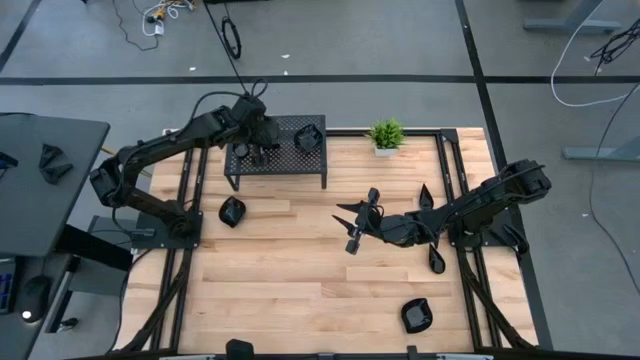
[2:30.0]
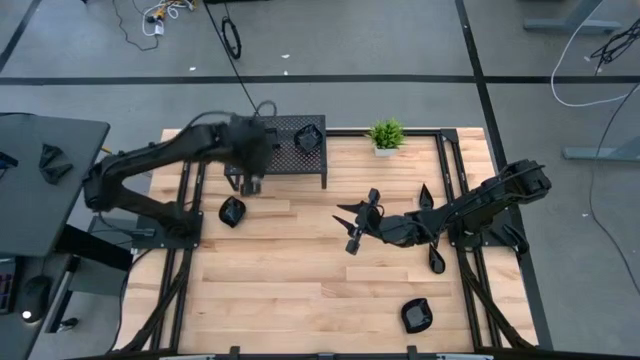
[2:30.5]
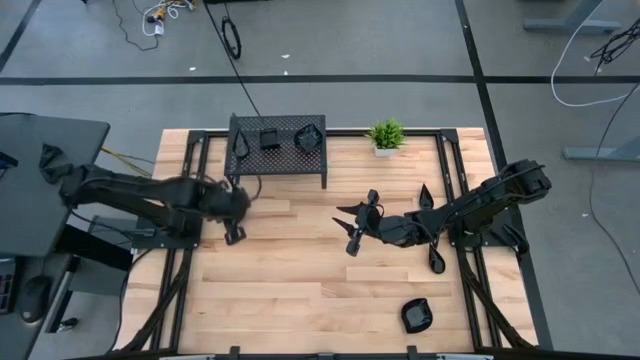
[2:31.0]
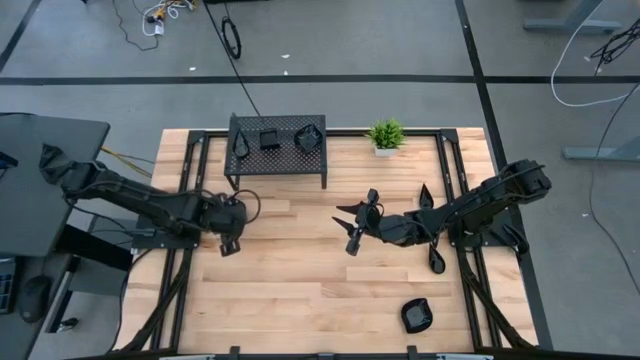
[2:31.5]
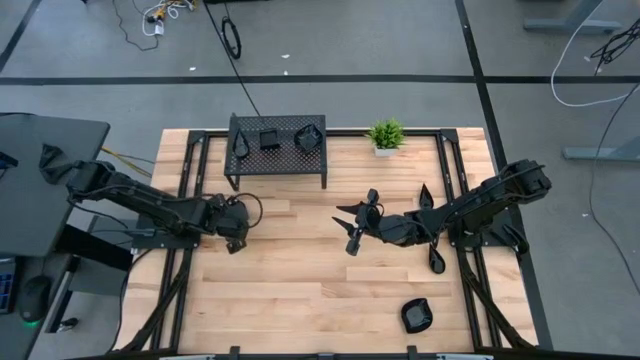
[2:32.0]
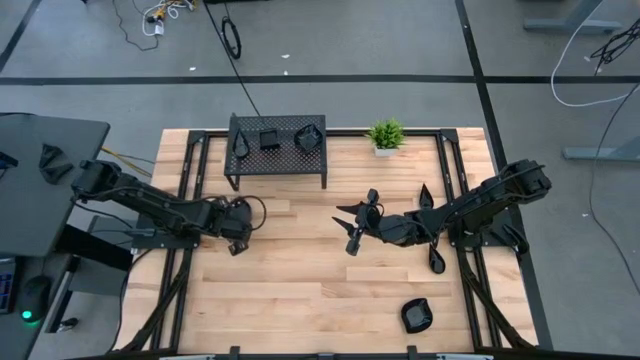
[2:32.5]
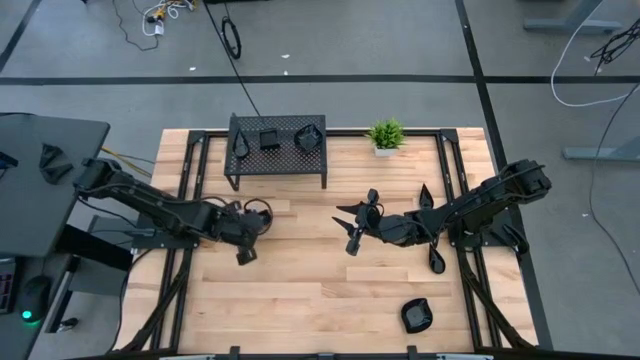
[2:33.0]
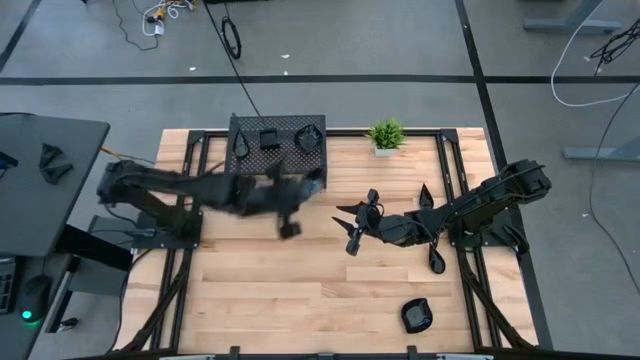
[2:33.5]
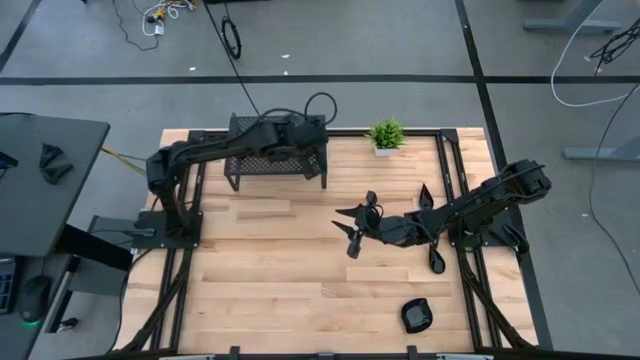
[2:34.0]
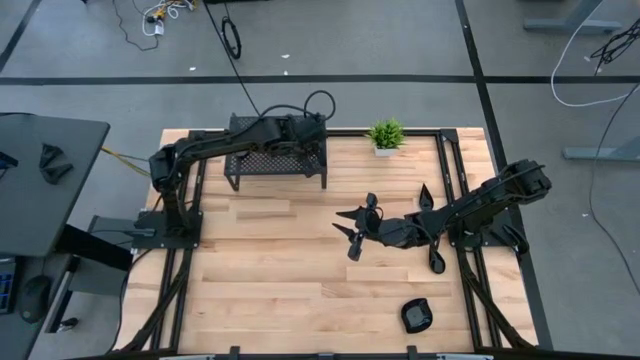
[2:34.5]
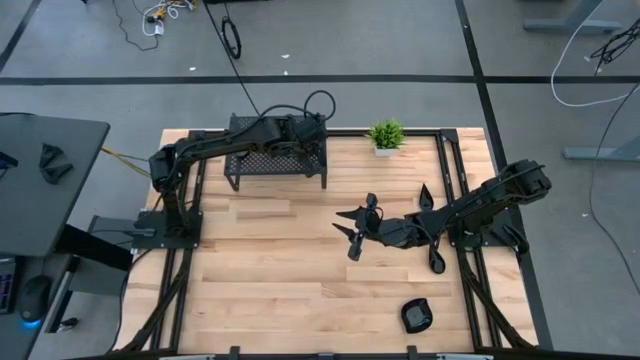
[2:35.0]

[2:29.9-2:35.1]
Task: Pick & Place Mini shaped plates
Stack the black leaf shaped plate on top of the black leaf shaped plates on the shelf

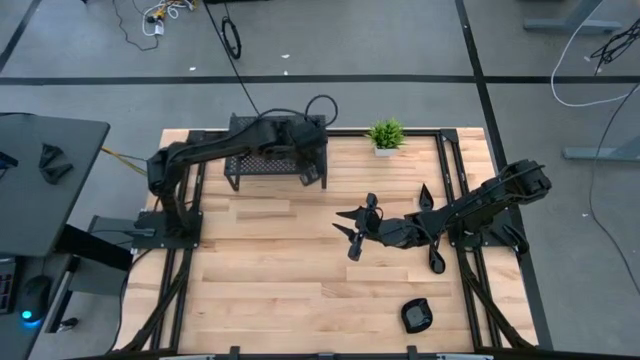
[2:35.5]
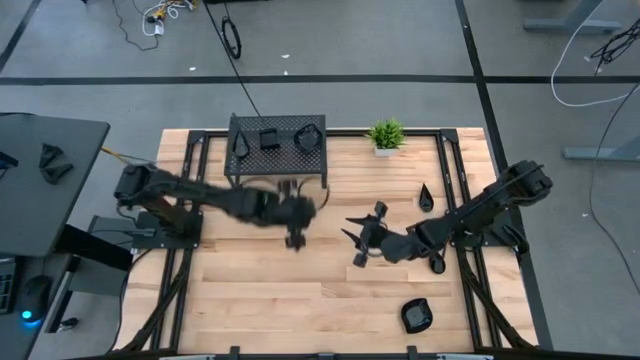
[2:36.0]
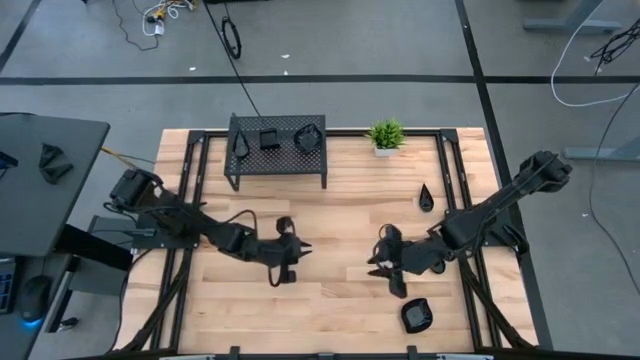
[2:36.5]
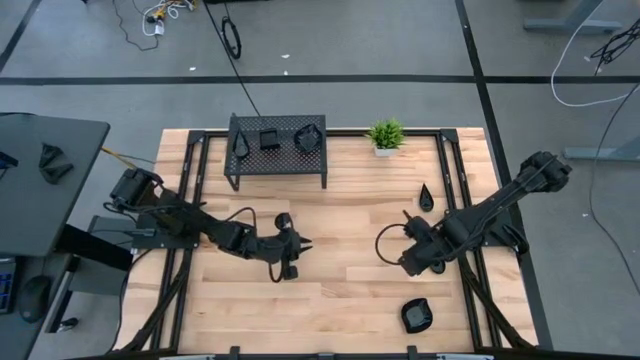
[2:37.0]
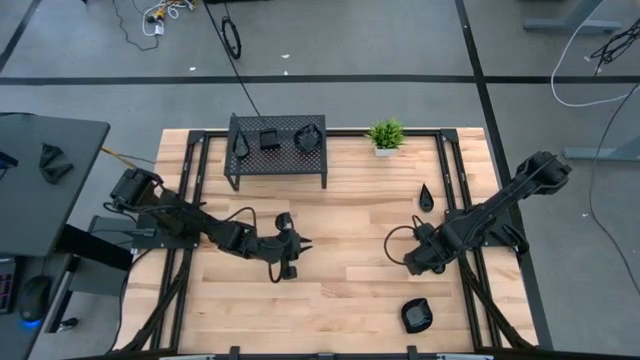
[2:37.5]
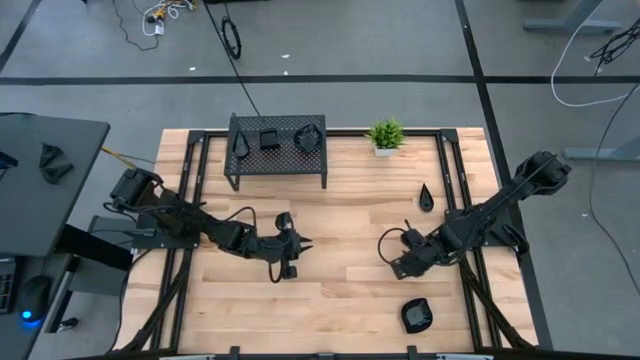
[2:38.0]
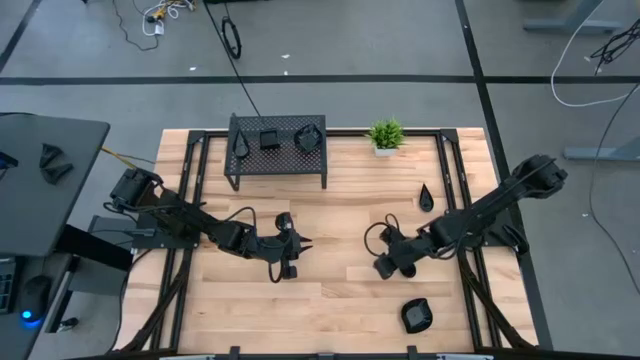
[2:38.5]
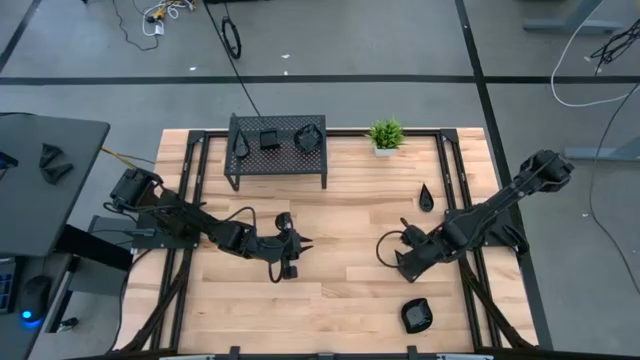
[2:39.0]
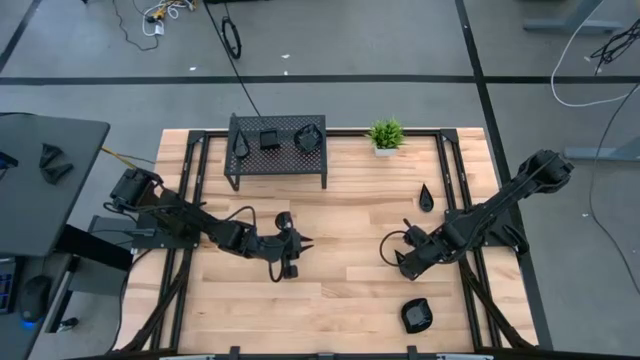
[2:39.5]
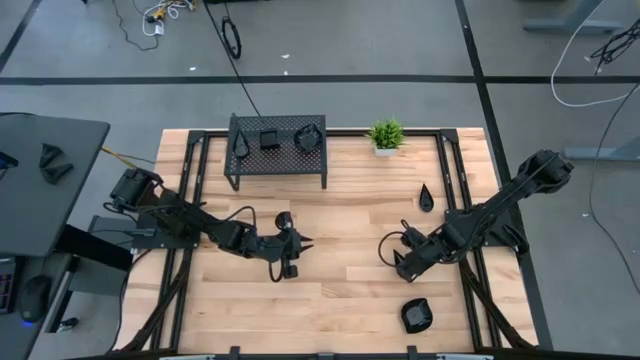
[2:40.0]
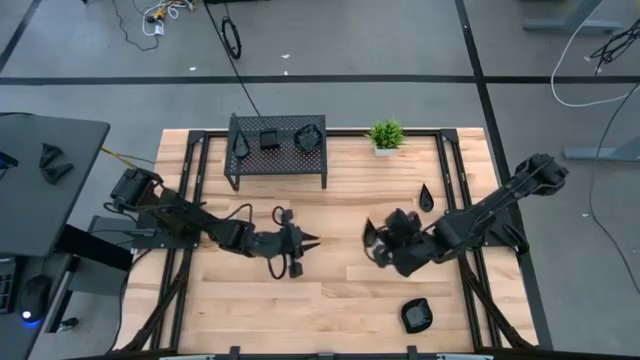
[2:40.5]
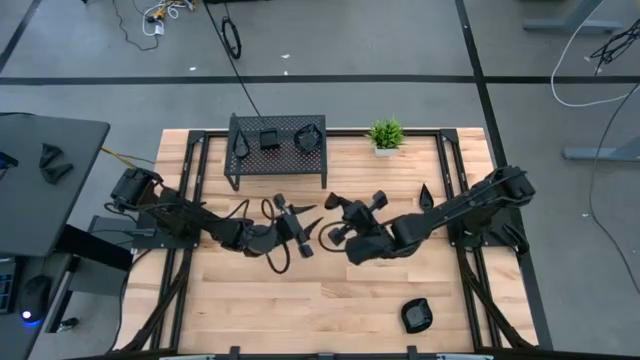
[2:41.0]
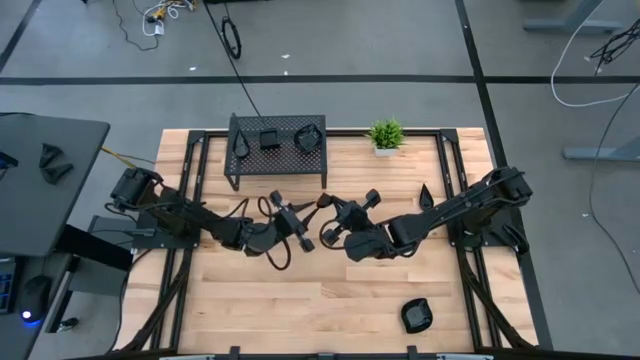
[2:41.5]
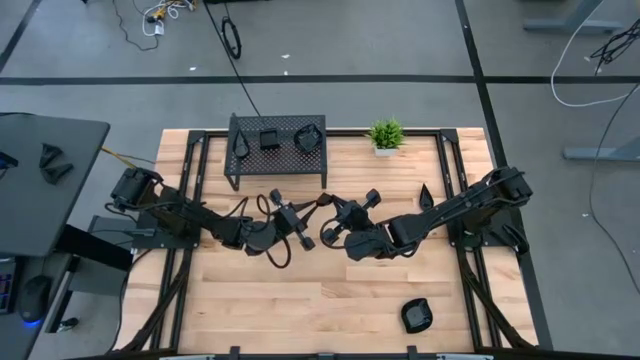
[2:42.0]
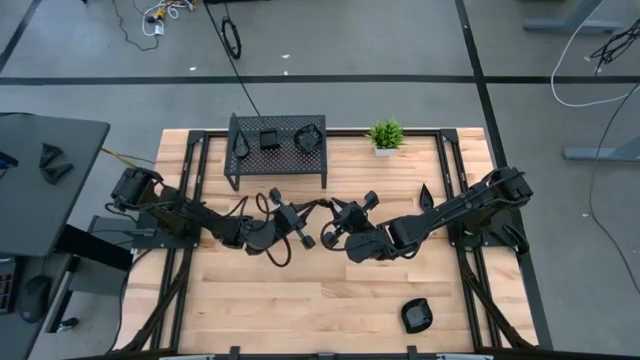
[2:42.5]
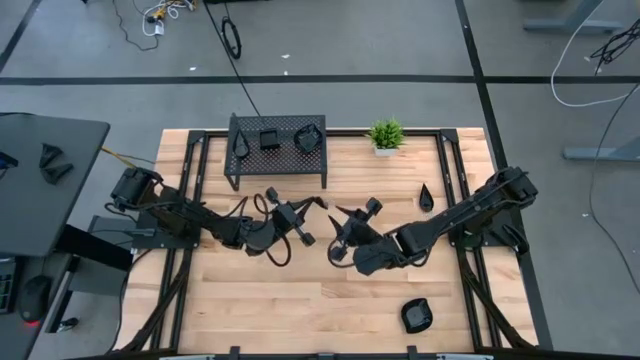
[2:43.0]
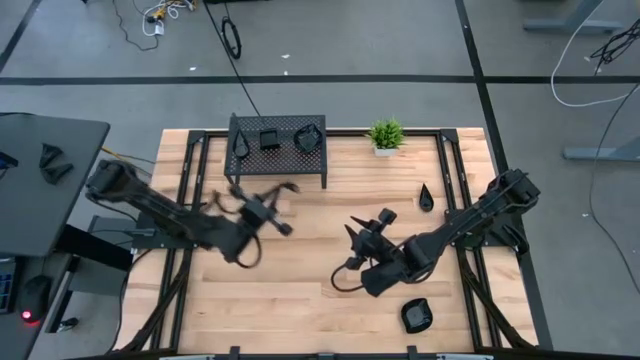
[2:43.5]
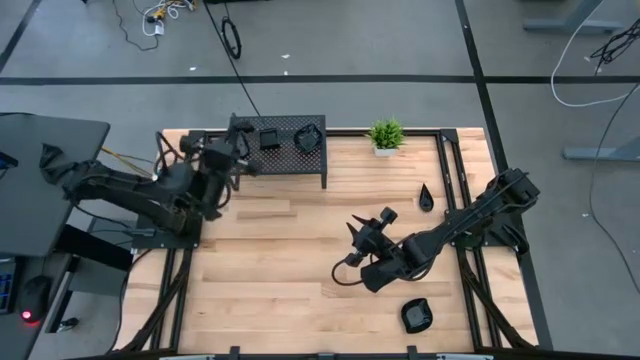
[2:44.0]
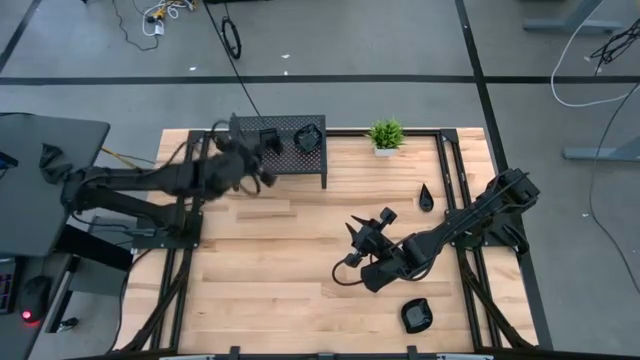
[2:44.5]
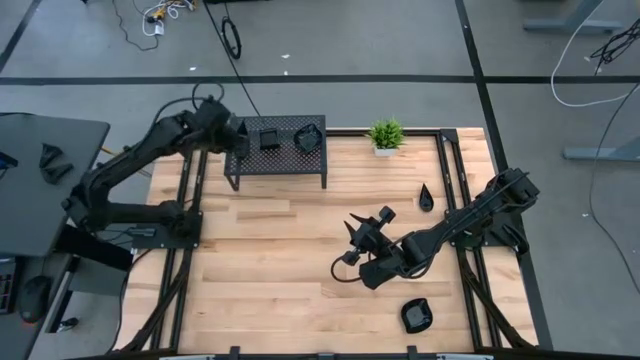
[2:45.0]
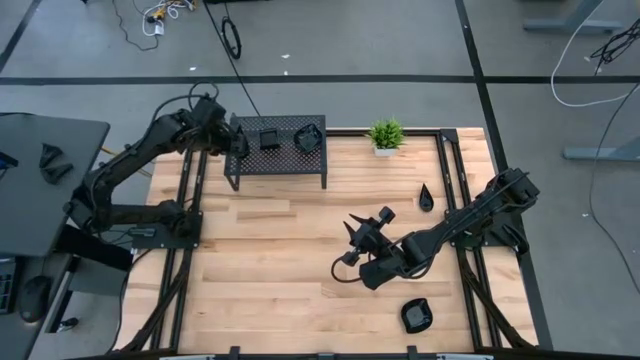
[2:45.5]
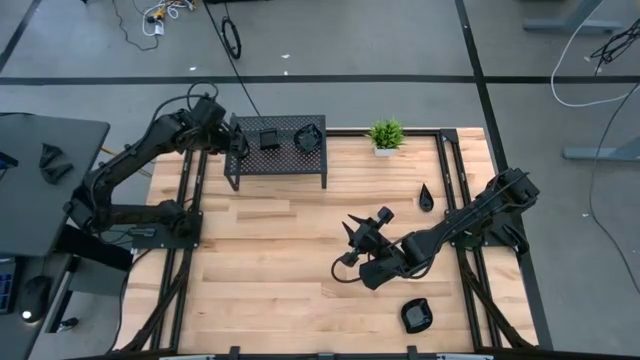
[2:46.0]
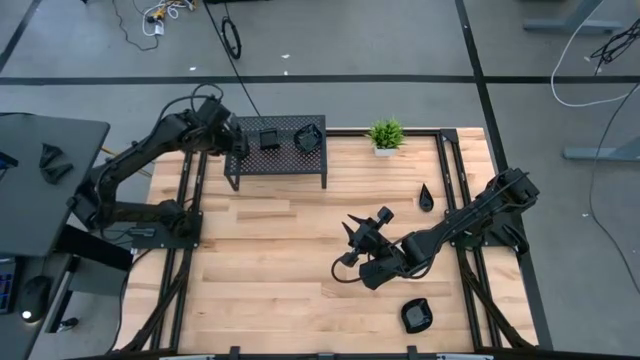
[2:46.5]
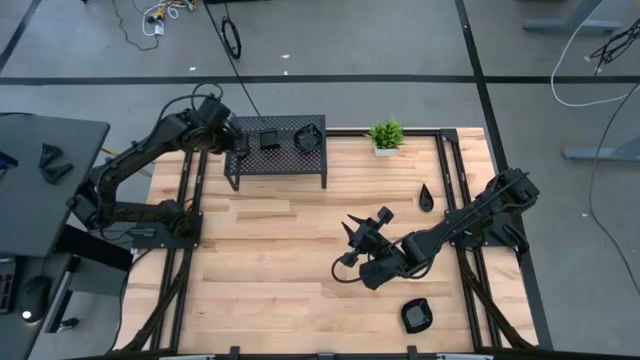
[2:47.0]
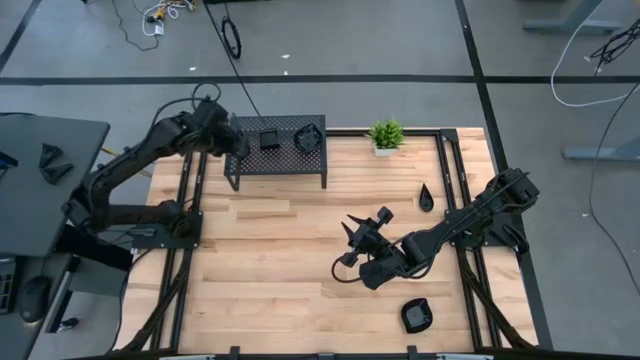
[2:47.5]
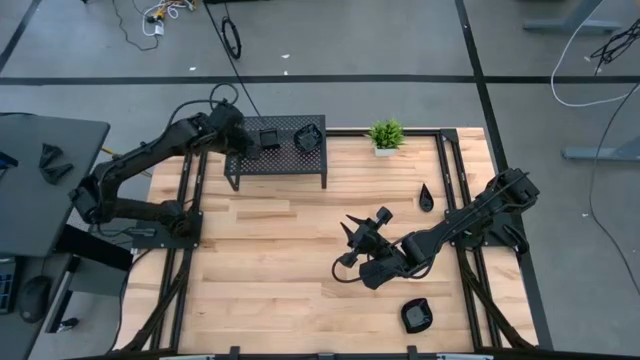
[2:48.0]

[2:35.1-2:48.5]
Stack the black drop shaped plate on top of the black drop shaped plates on the shelf

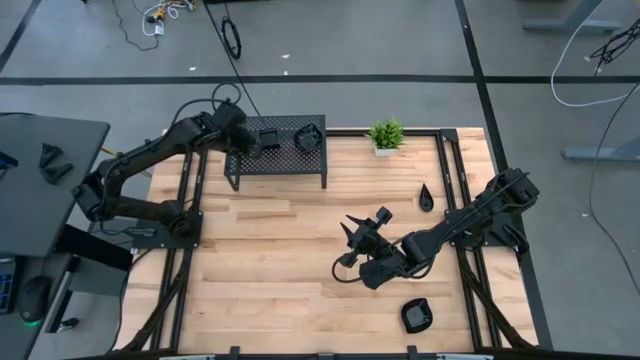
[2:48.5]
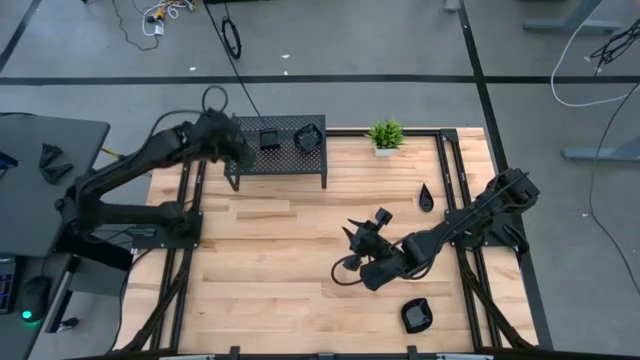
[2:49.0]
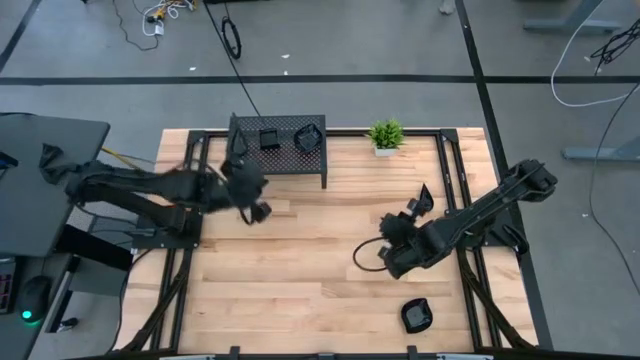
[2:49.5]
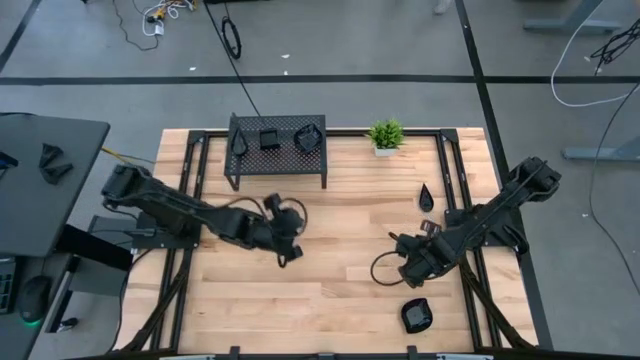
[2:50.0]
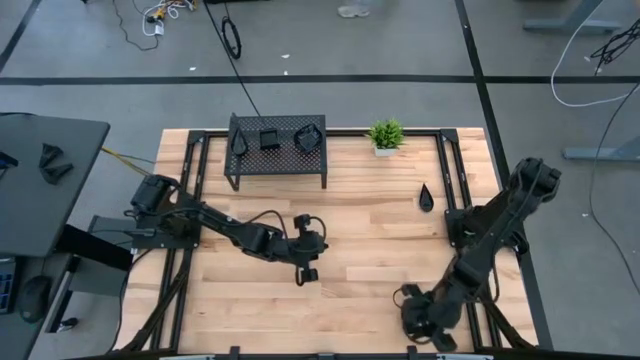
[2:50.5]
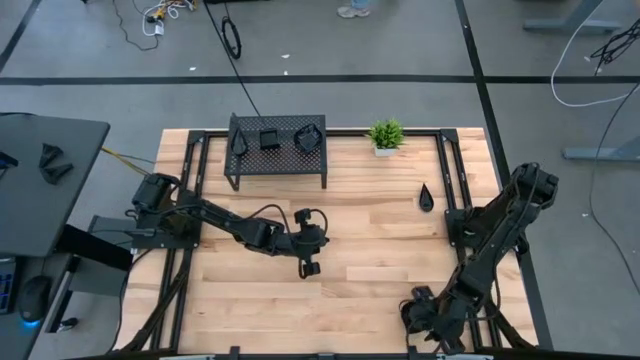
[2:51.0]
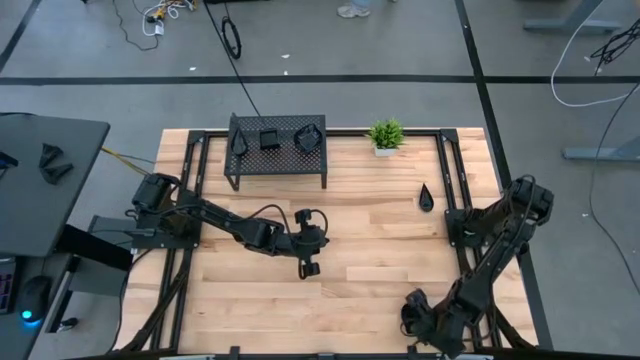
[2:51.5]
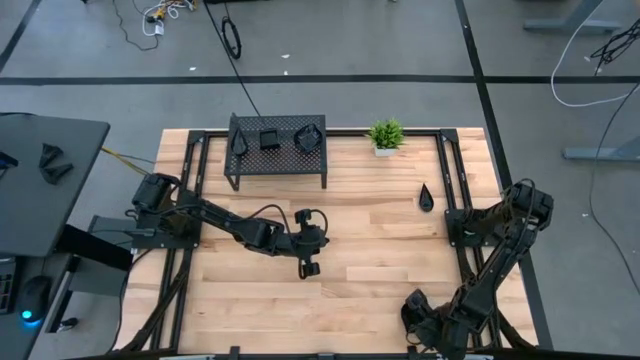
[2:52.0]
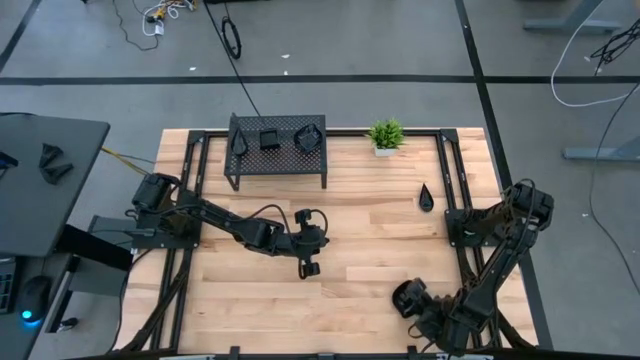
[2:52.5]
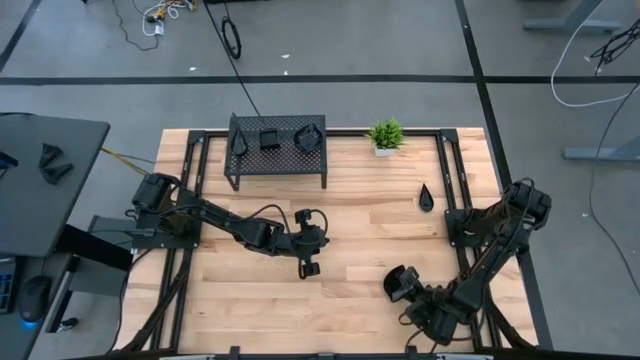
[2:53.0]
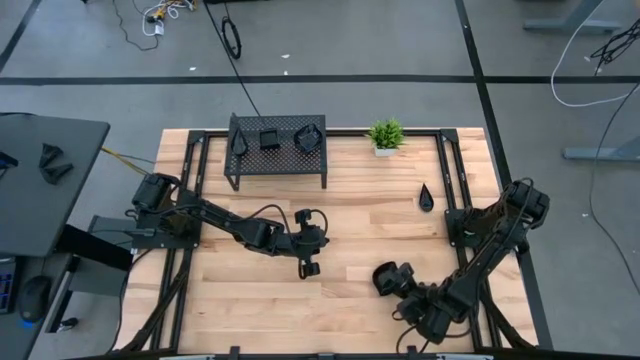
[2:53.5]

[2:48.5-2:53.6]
Stack the black leaf shaped plate on top of the black leaf shaped plates on the shelf
